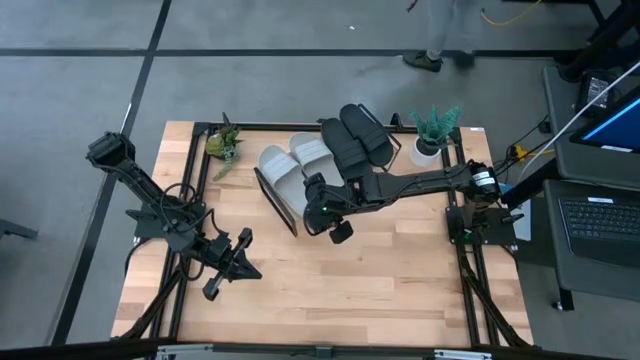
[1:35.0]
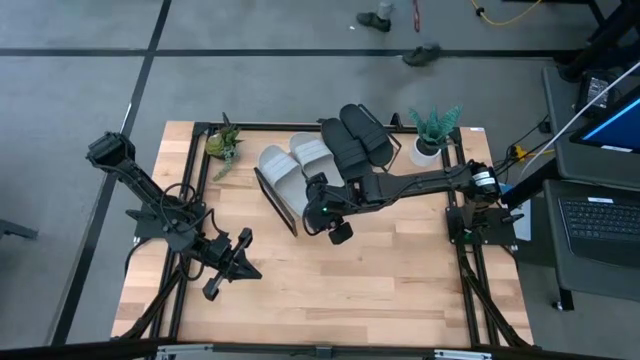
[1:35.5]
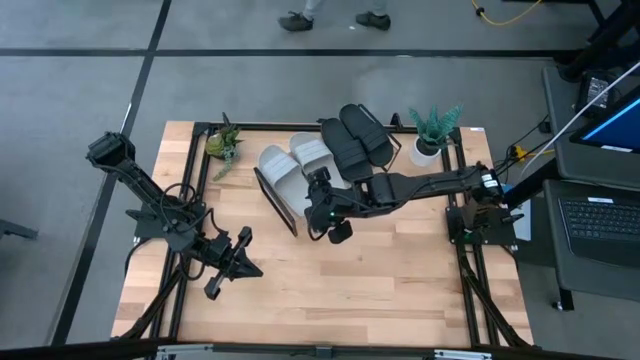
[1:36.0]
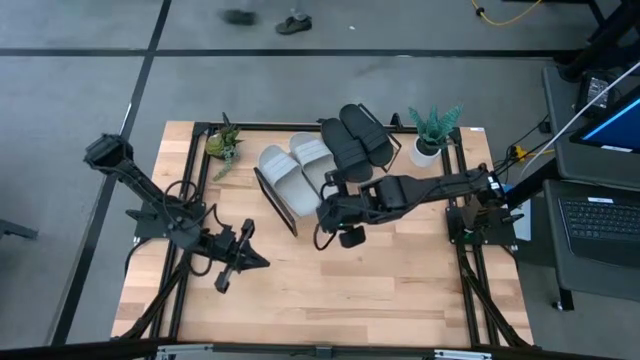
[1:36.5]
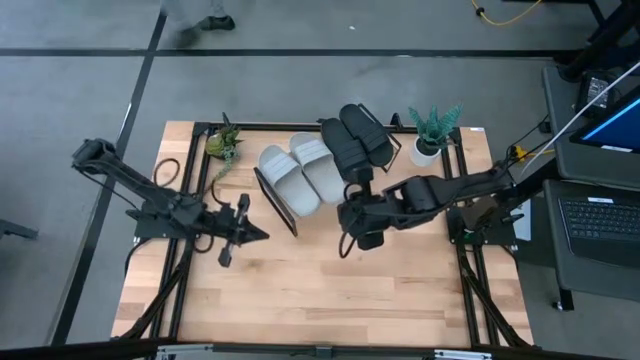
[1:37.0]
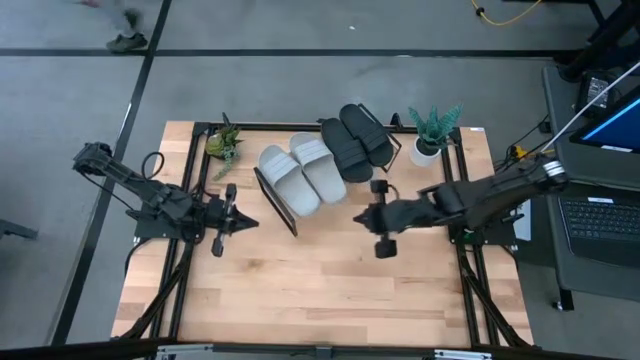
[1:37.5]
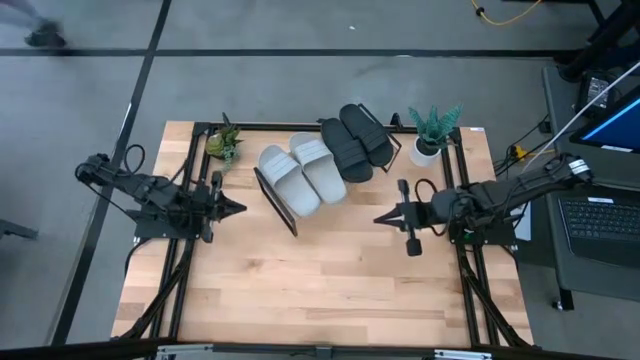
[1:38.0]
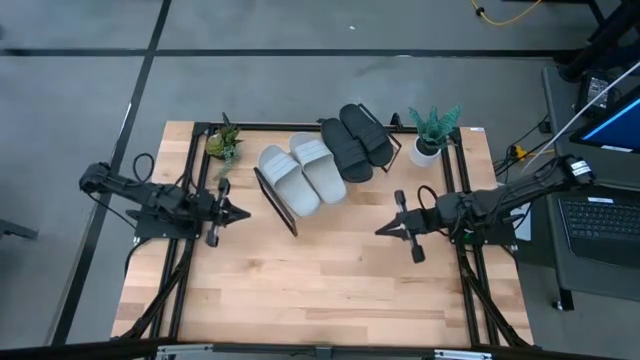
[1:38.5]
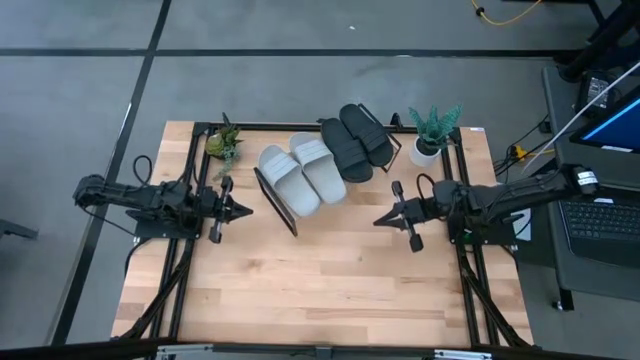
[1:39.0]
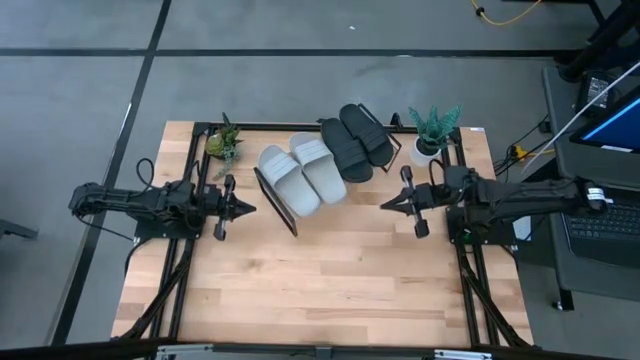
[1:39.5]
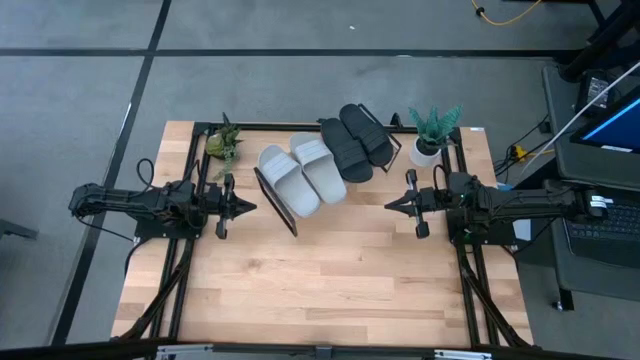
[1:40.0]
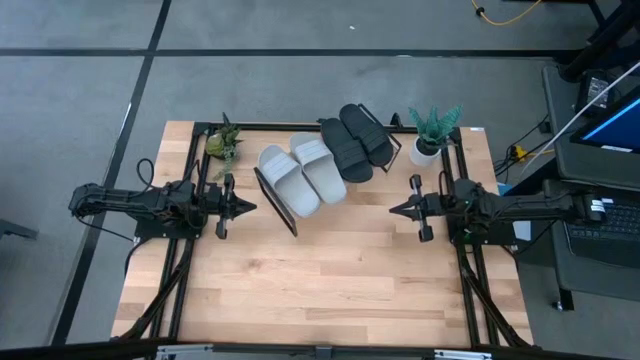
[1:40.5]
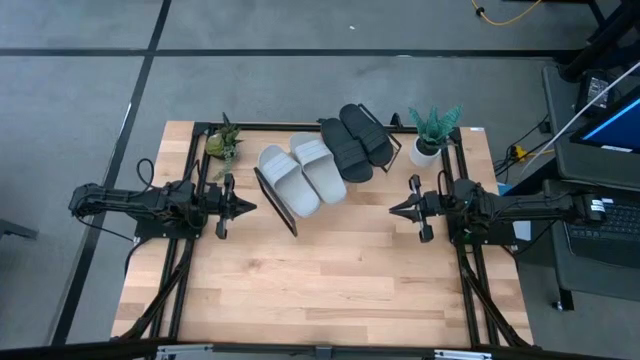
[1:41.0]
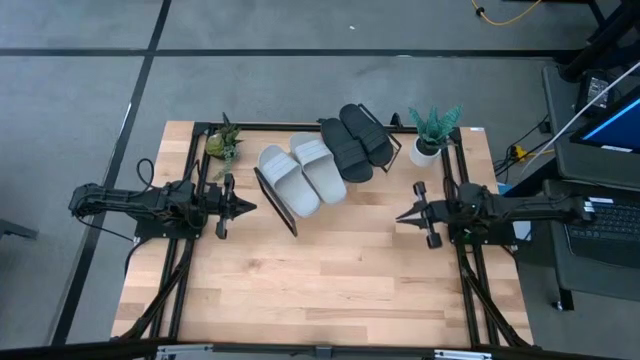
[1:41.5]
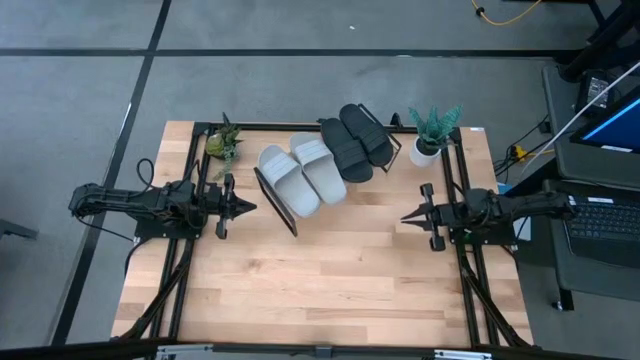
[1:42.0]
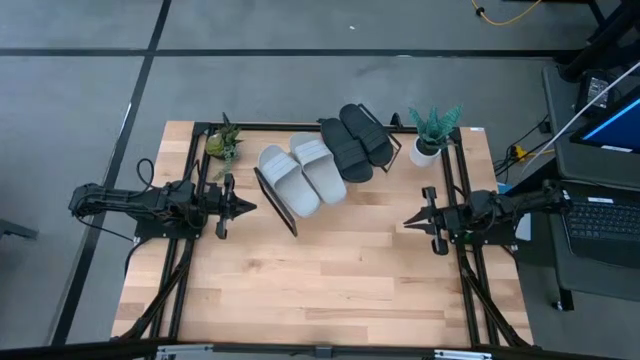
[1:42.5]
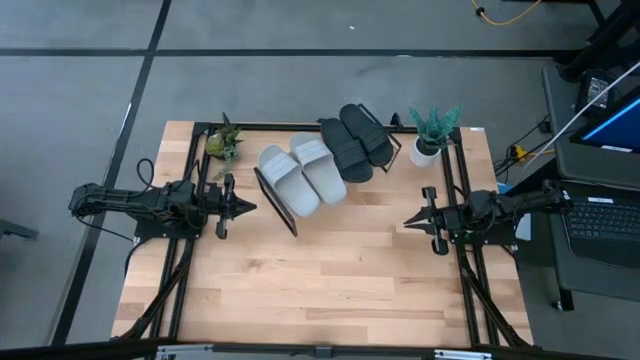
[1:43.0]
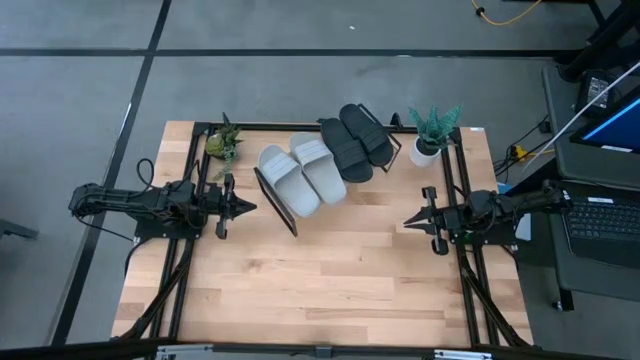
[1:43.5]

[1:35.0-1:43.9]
Task: Pick and place slides into the shelf
Return to Home Position

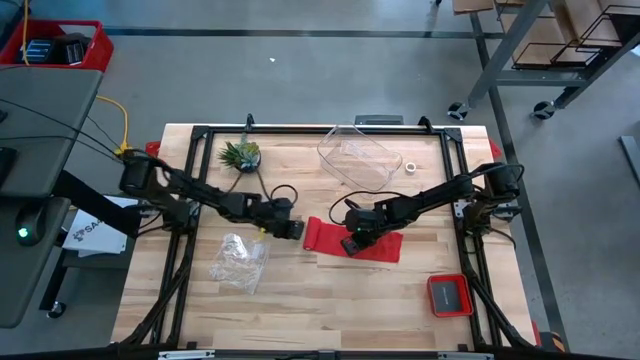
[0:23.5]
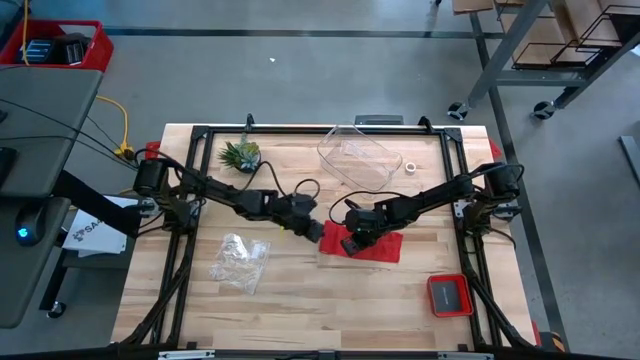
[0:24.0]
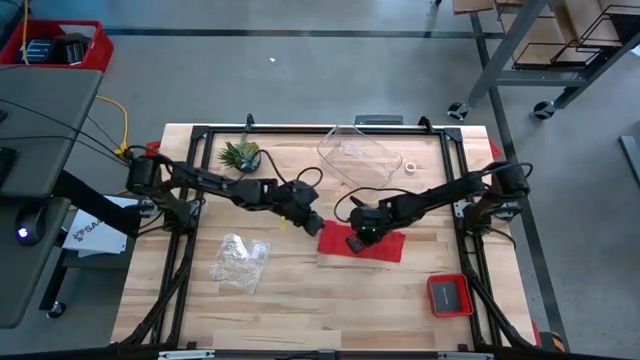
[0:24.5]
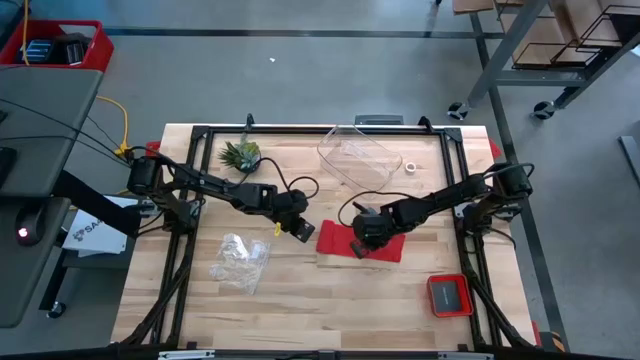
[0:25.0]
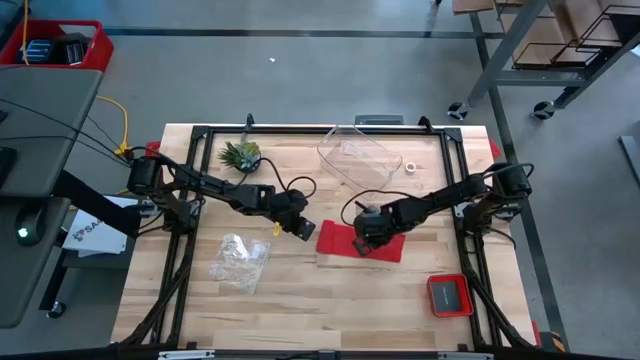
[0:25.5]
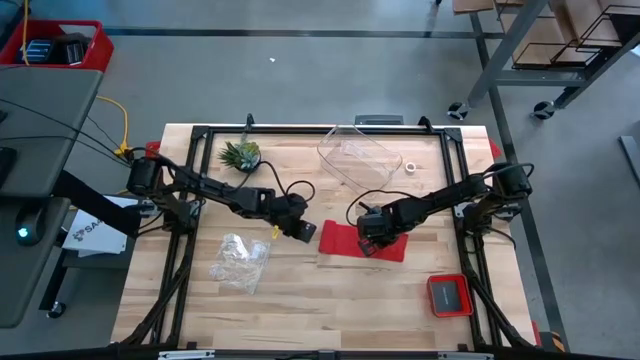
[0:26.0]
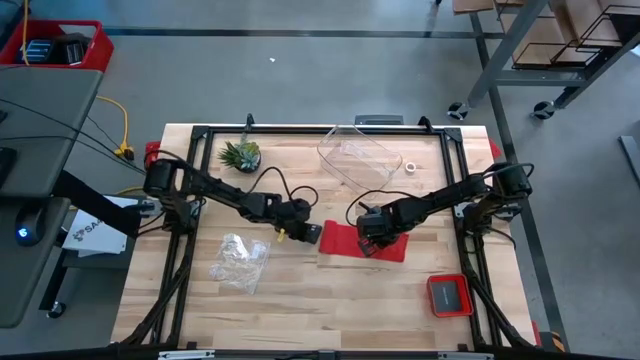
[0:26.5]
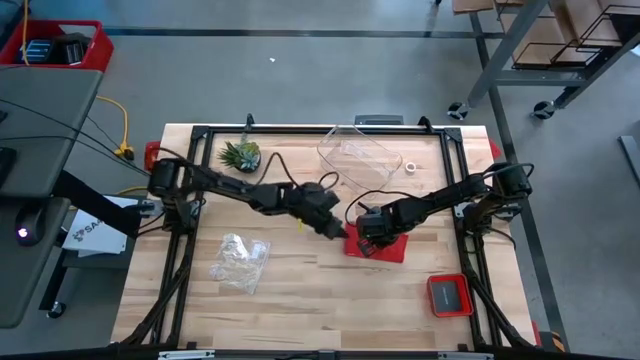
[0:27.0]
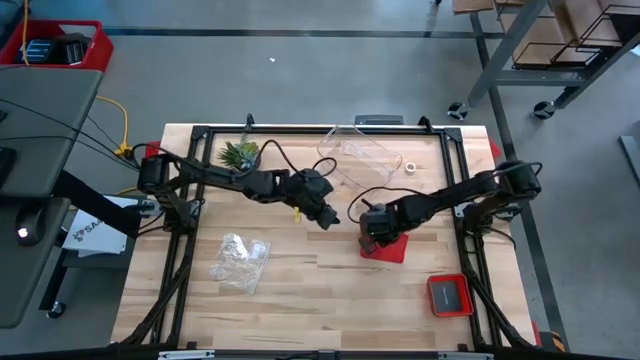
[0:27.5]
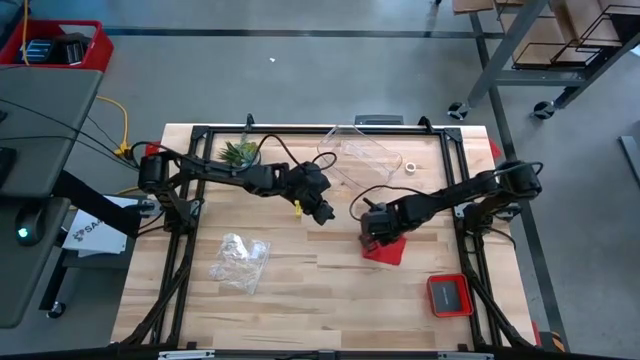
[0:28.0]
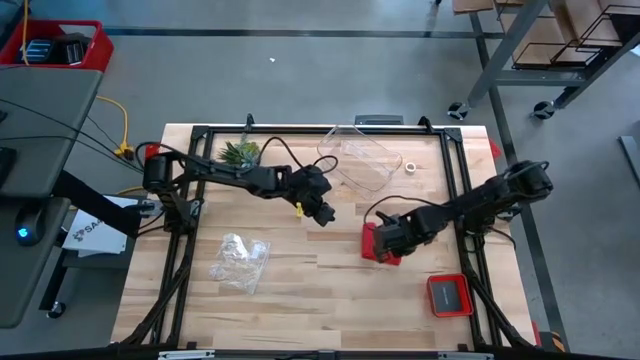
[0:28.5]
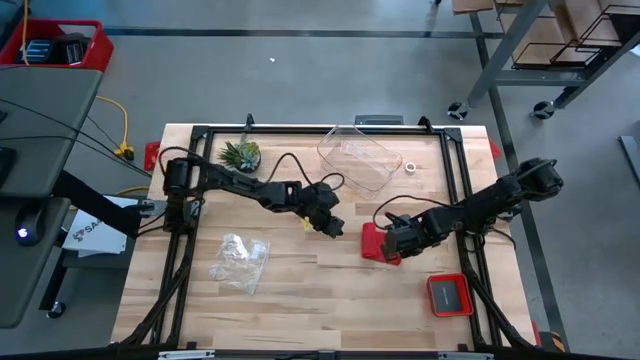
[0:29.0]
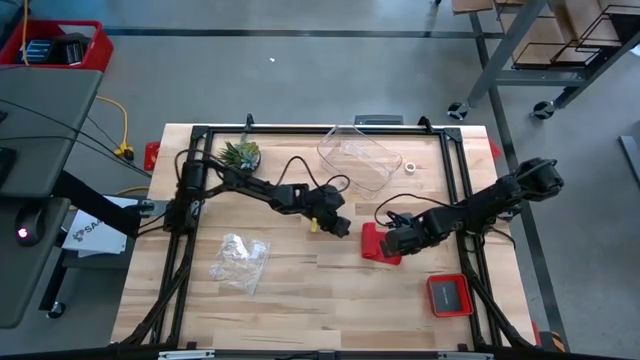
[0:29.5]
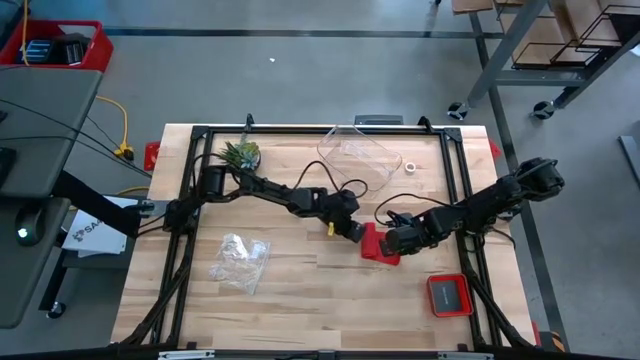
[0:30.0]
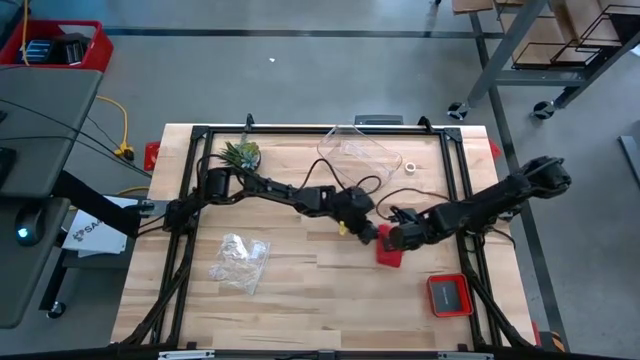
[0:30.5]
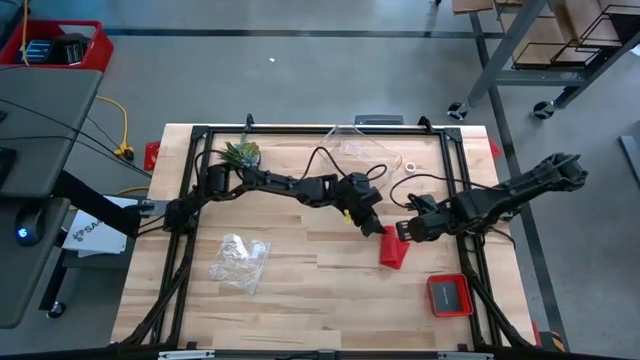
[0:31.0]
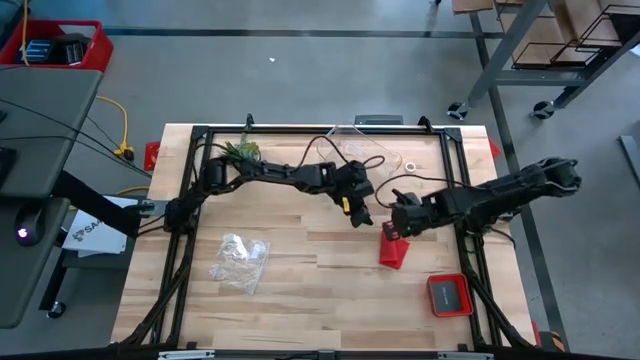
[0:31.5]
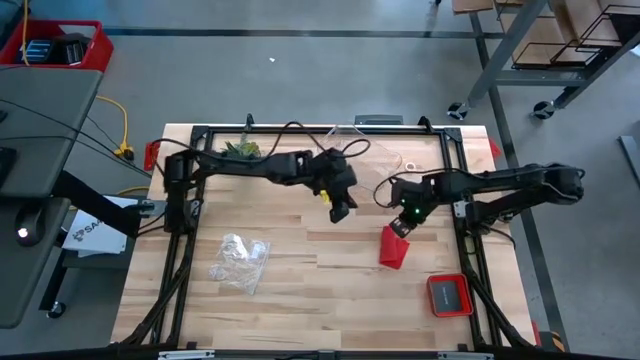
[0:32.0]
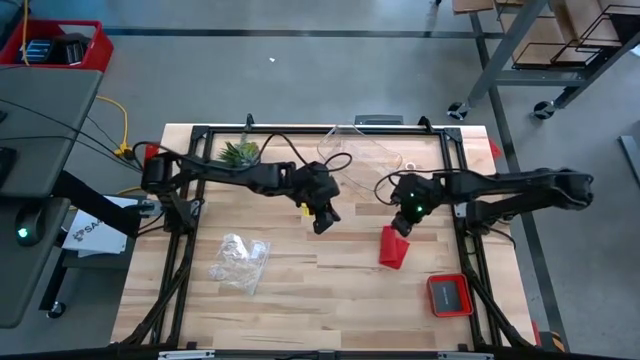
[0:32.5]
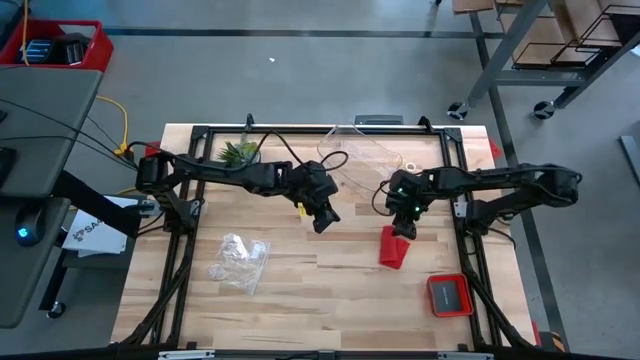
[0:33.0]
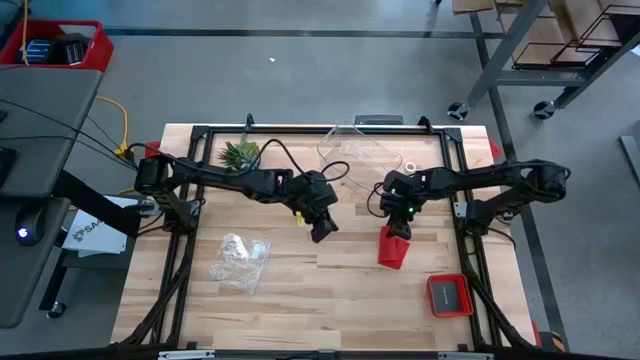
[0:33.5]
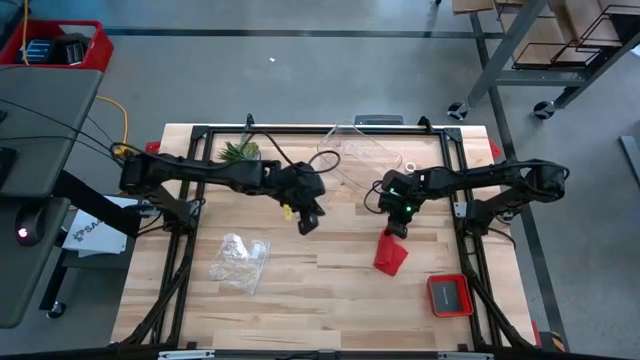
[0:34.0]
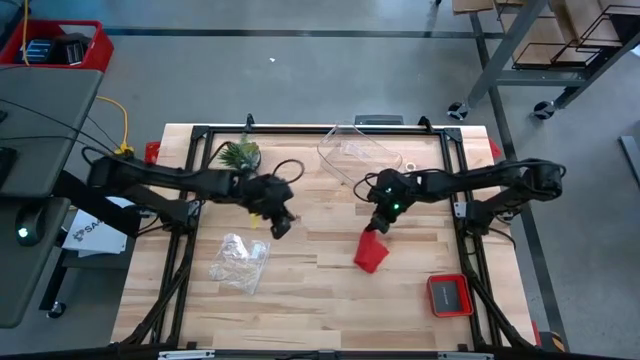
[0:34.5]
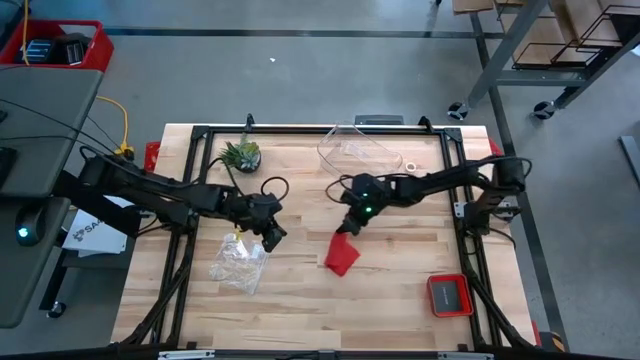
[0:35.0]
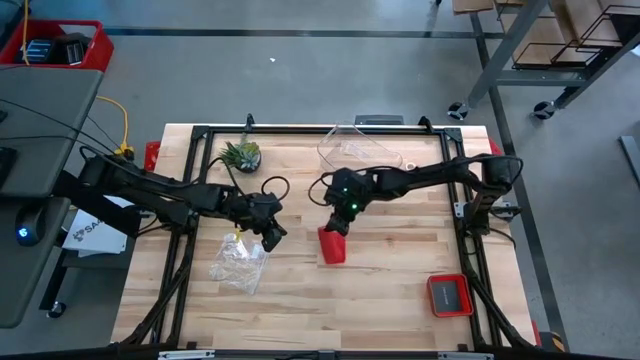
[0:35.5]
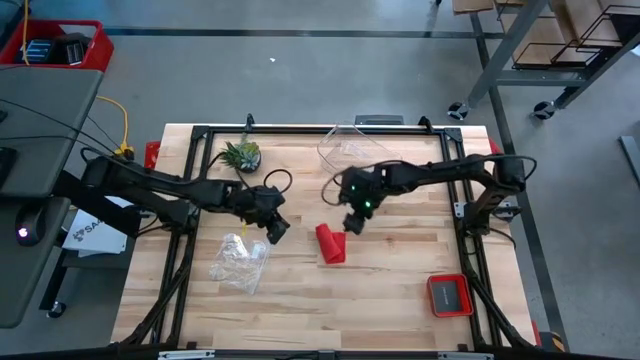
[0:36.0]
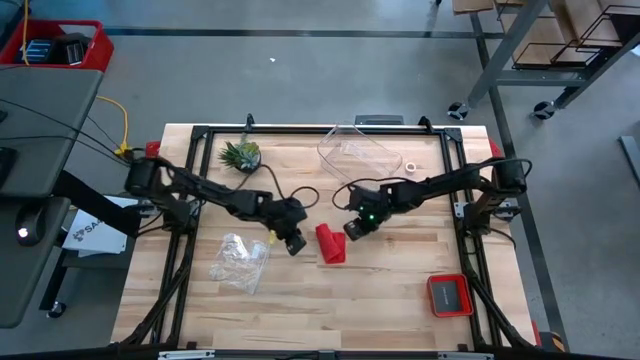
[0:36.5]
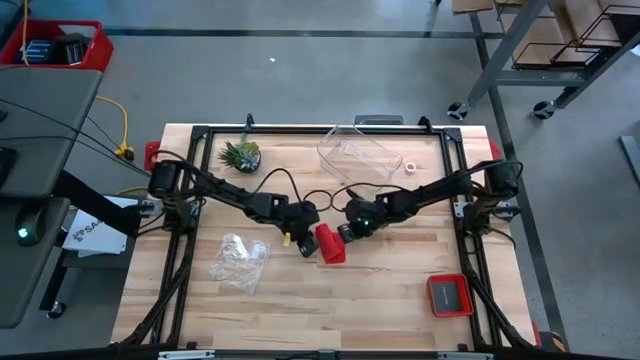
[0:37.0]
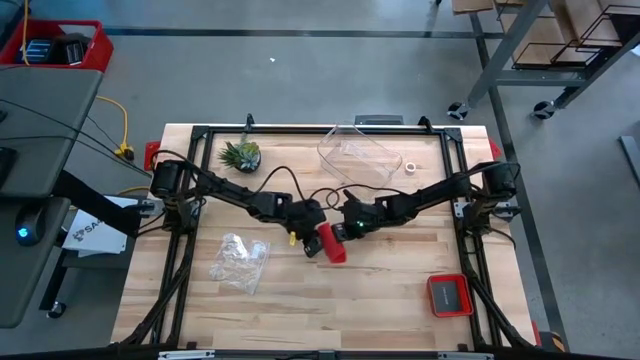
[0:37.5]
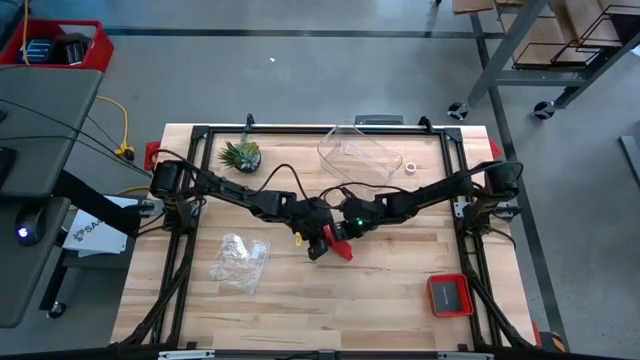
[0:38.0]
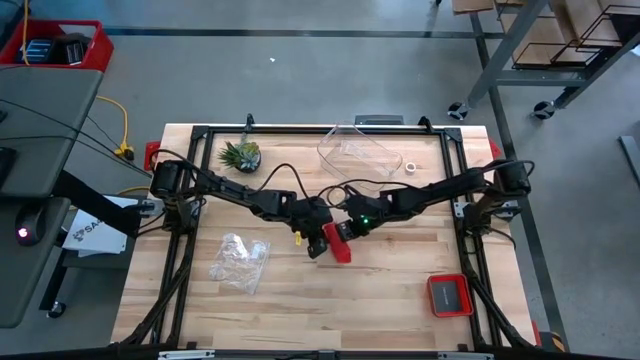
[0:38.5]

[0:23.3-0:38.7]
Task: Roll bandage
Roll the red bandage
